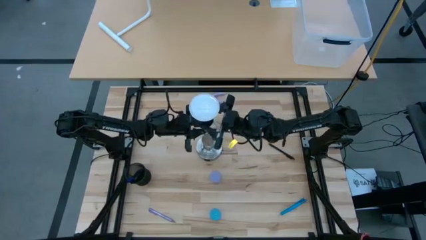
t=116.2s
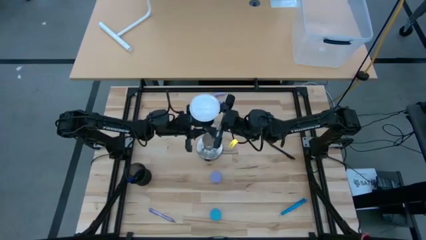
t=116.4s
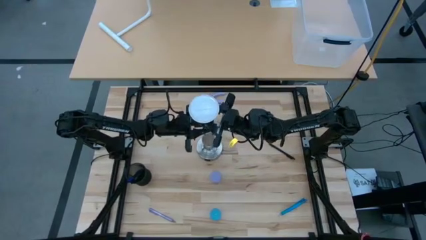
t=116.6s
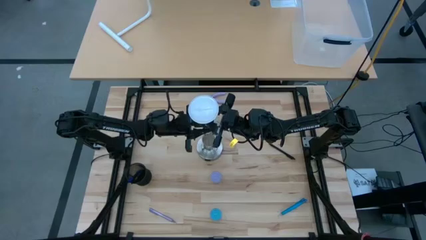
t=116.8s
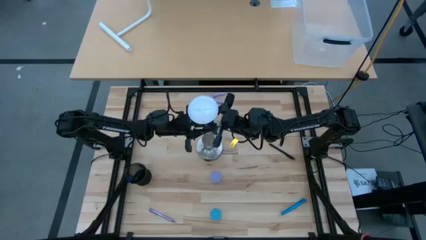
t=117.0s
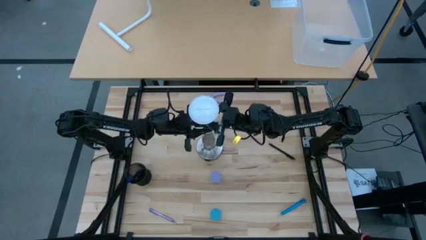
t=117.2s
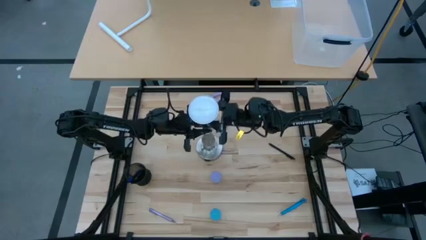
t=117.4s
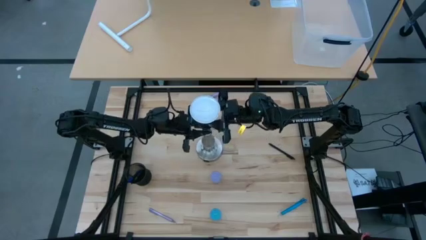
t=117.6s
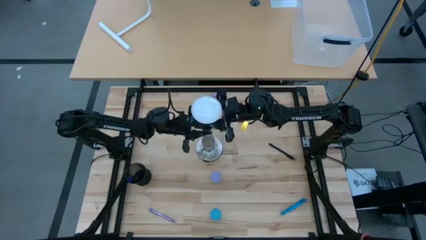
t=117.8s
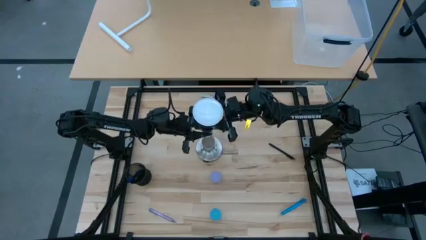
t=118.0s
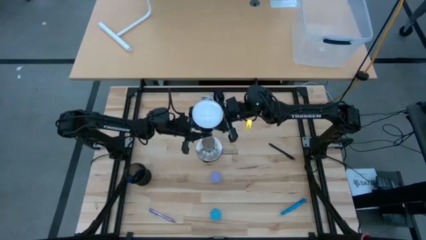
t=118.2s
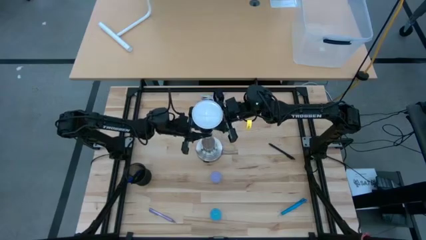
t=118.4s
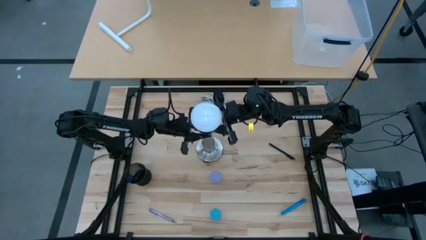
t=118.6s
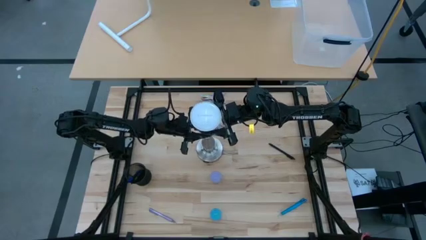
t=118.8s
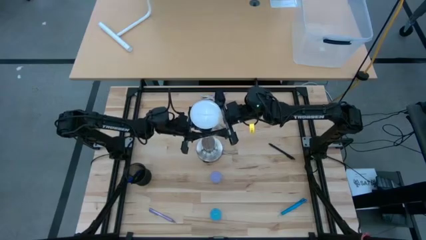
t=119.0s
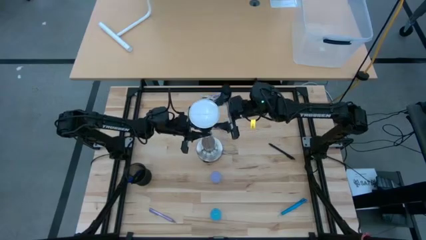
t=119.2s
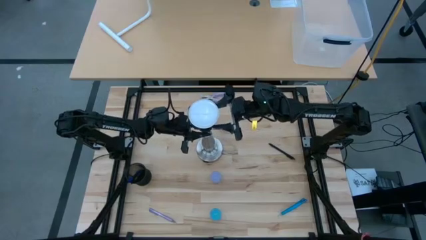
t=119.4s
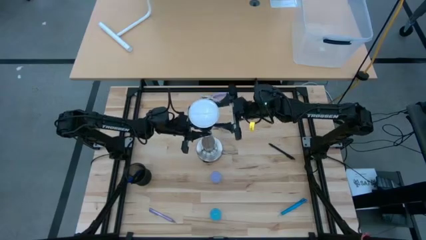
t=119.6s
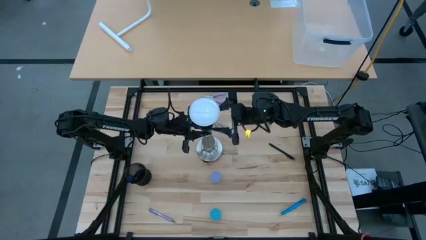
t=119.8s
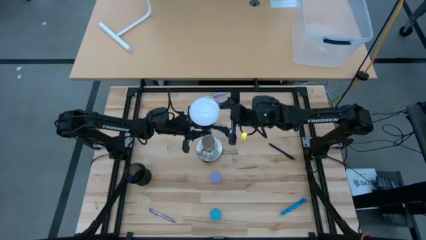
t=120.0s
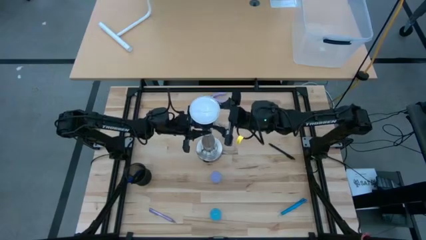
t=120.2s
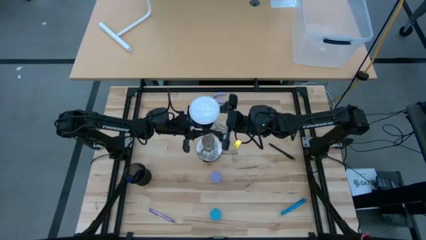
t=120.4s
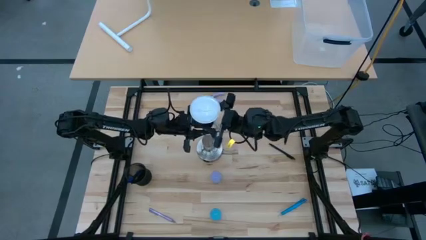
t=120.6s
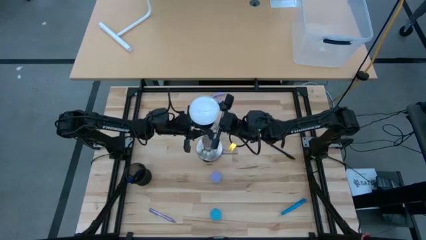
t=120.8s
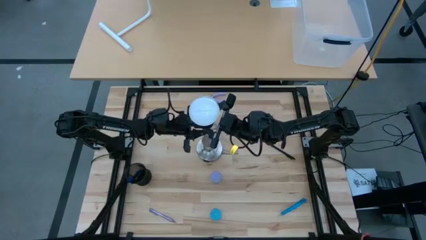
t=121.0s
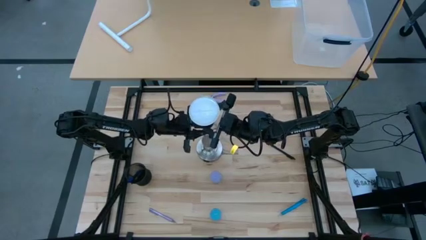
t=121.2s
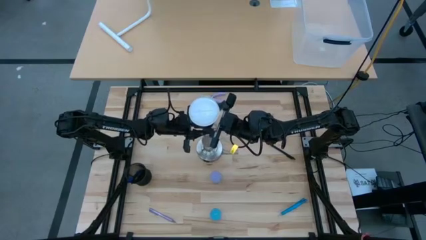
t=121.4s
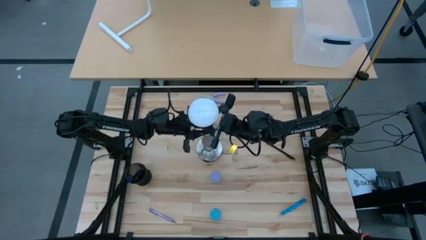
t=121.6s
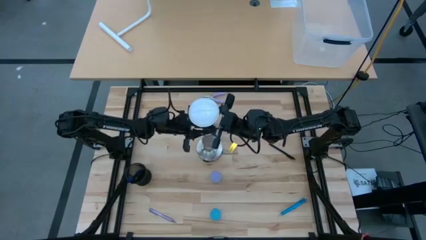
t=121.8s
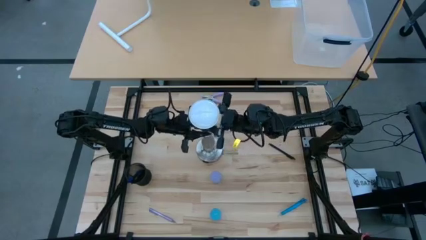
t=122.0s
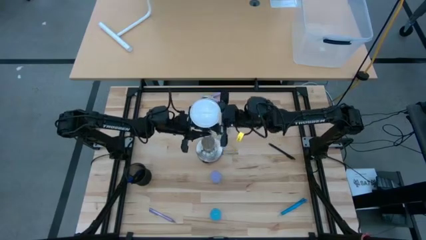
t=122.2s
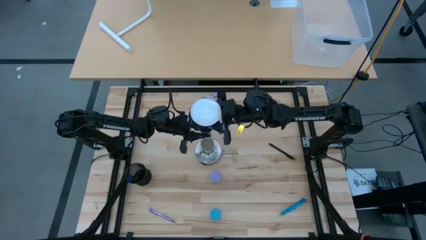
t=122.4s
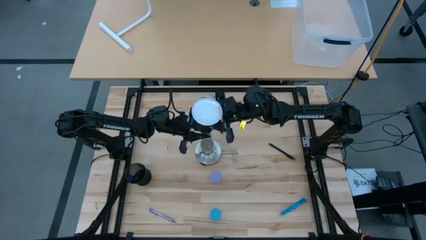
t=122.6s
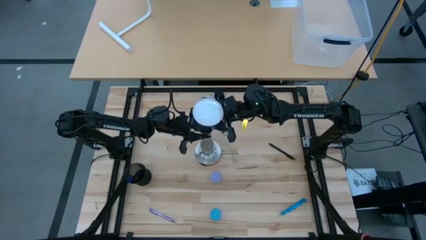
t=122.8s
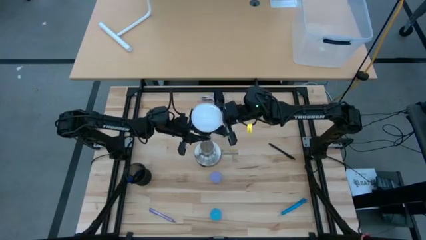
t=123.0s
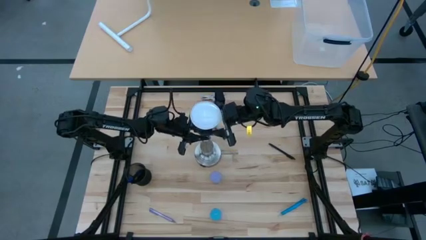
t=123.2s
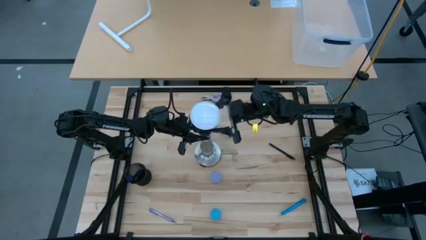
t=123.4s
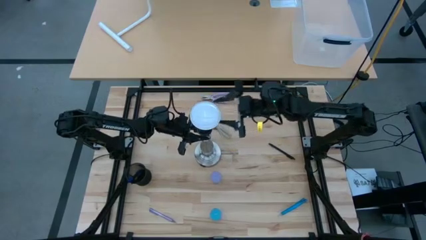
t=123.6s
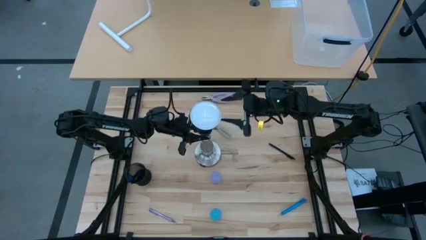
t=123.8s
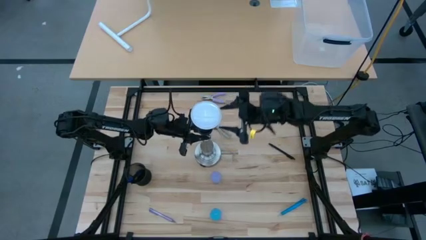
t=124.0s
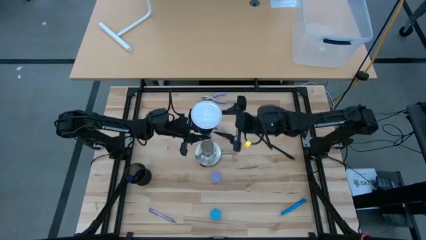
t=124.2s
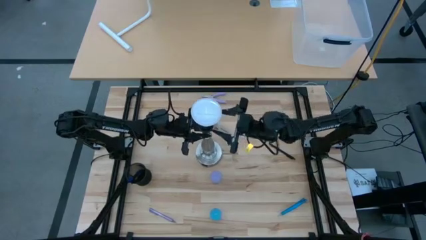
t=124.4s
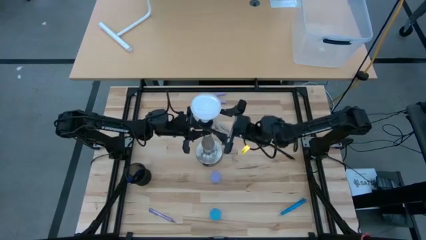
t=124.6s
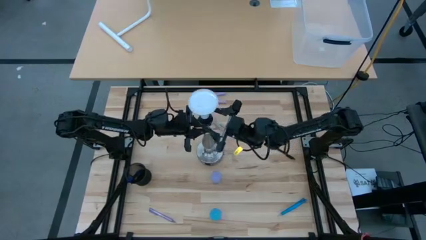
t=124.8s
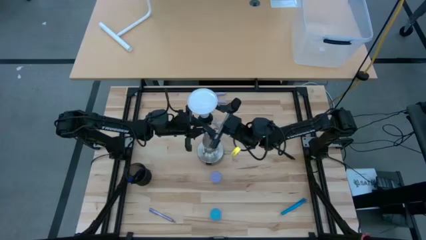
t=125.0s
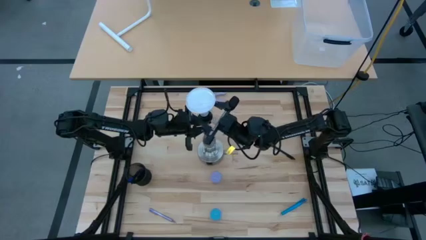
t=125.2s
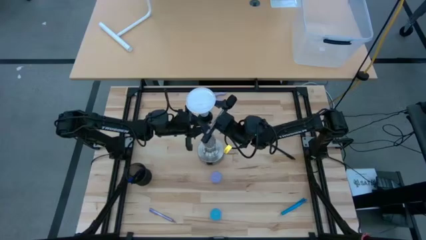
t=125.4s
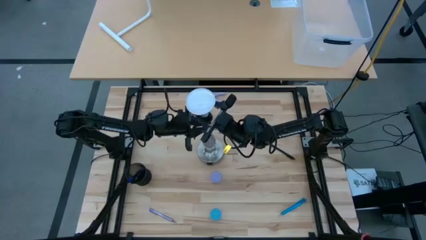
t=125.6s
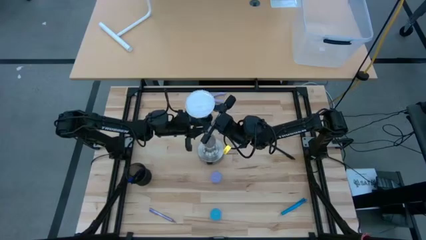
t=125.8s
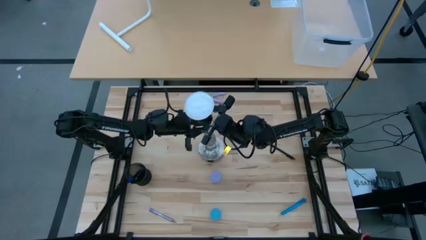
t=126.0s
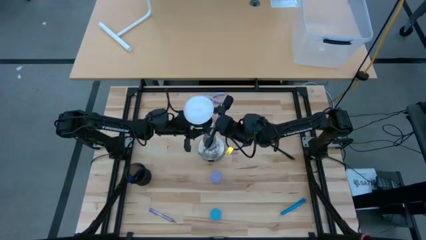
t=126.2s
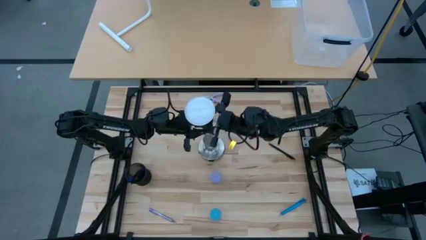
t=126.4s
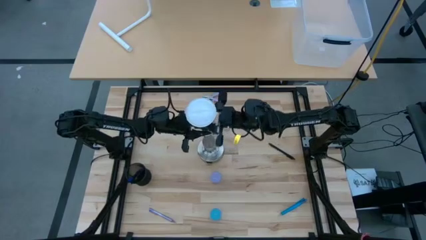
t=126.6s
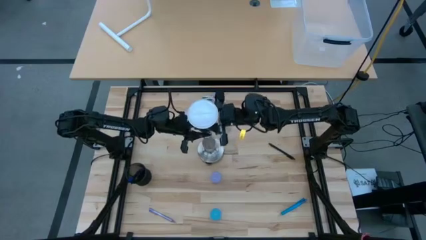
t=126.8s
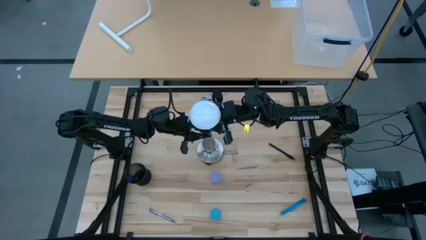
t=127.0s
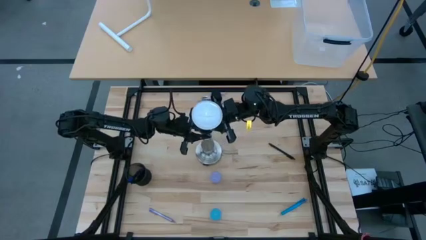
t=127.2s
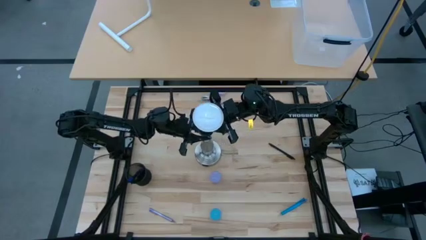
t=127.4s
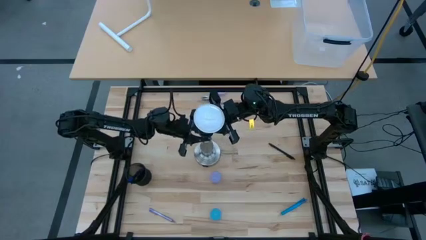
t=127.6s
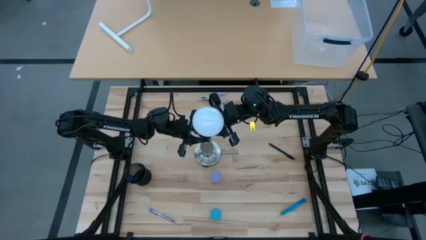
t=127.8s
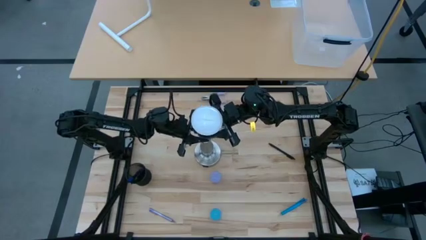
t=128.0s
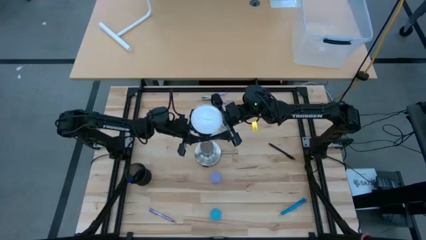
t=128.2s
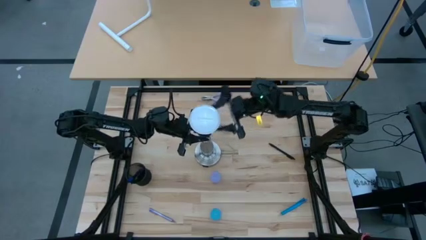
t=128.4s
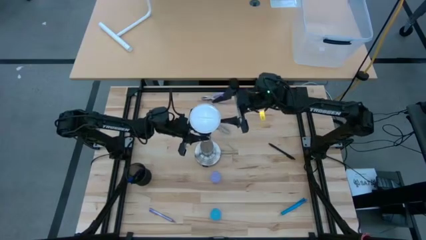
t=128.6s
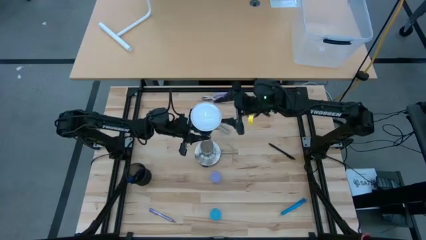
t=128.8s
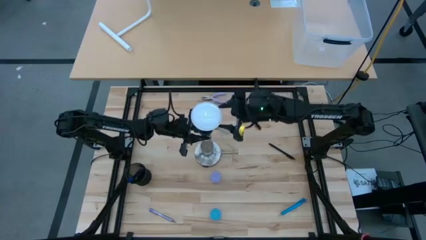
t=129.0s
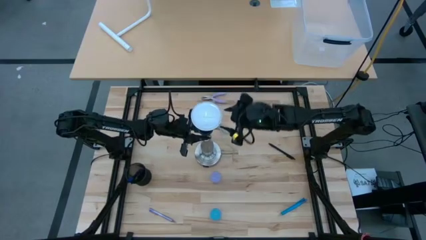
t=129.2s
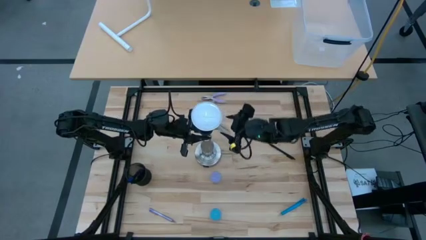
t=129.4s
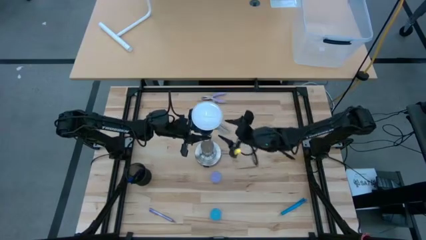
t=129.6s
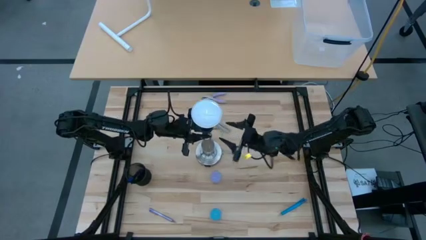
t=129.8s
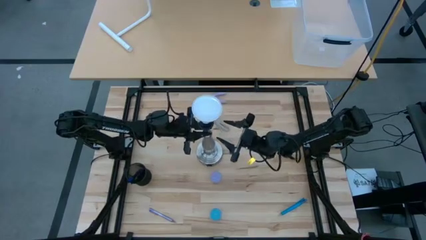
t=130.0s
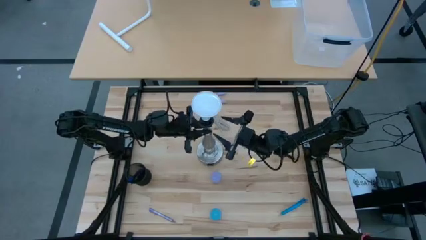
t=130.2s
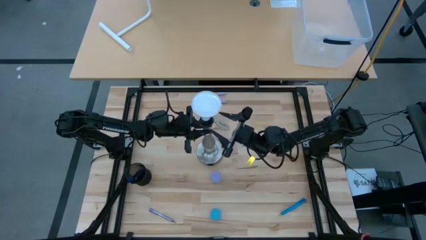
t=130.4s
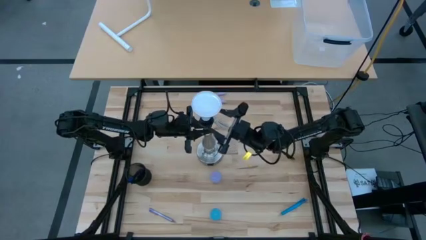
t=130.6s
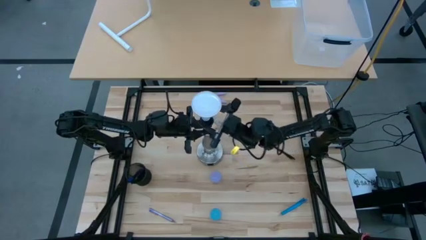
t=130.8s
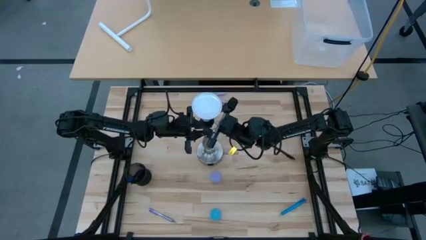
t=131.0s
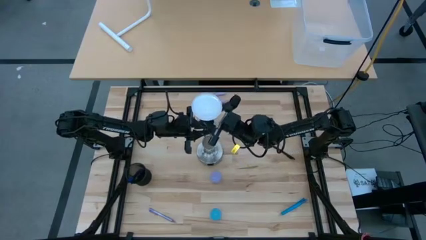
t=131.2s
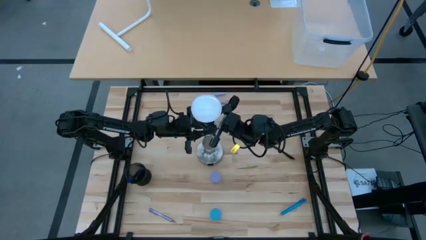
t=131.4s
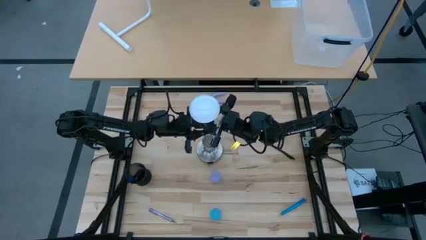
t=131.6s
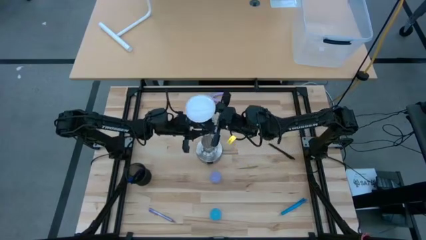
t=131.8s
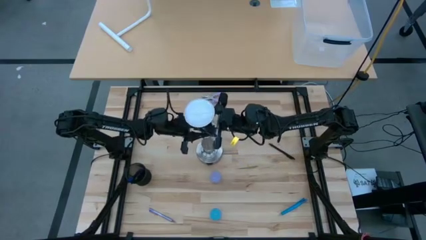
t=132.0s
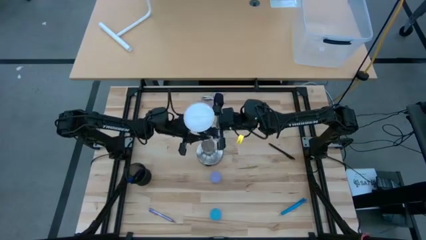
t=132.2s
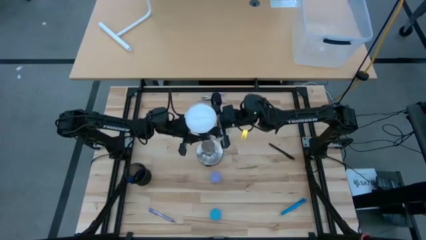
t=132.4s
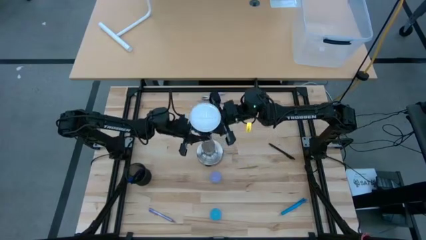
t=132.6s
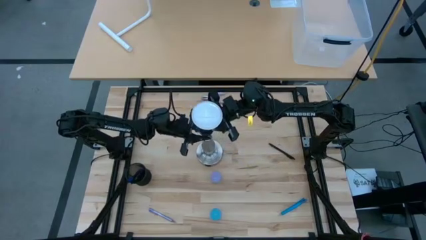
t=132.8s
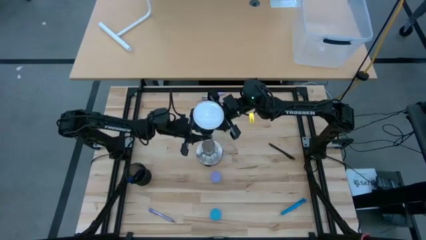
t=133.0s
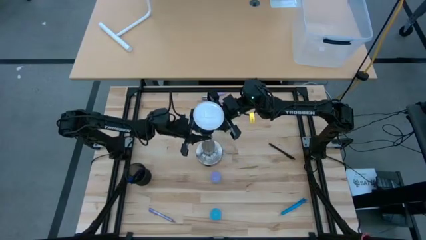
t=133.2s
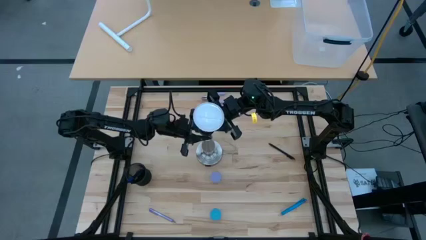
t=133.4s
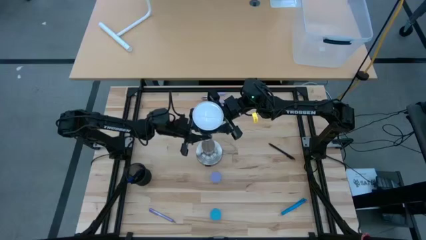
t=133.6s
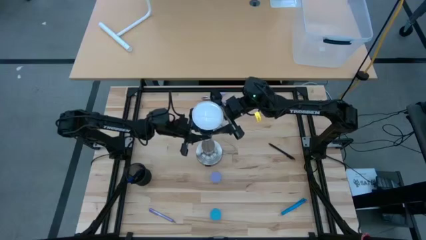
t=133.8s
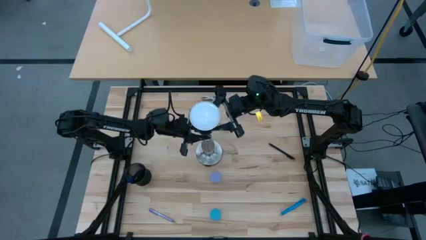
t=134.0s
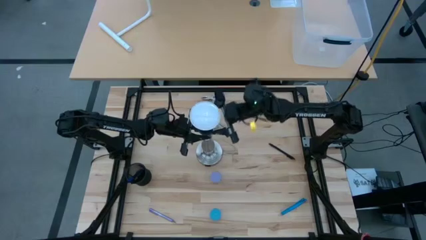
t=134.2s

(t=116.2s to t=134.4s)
Task: Screw lightbulb
Remove the lightbulb from the silver lamp socket
